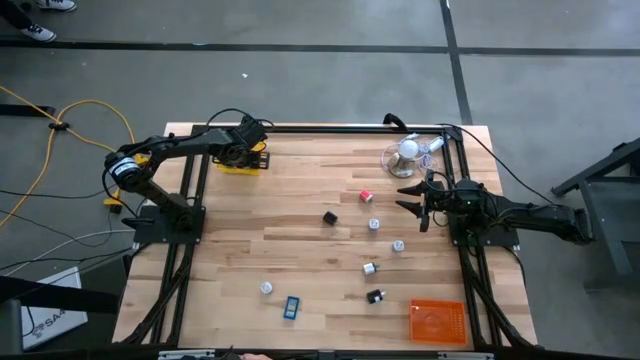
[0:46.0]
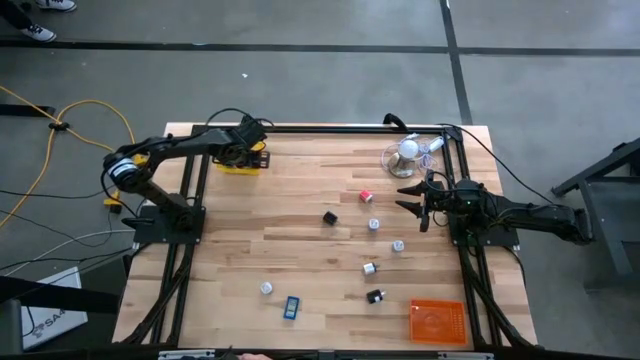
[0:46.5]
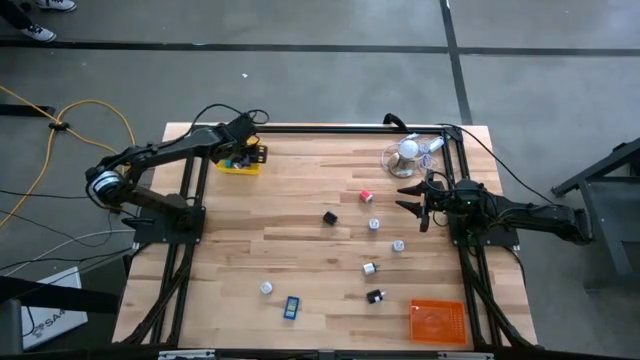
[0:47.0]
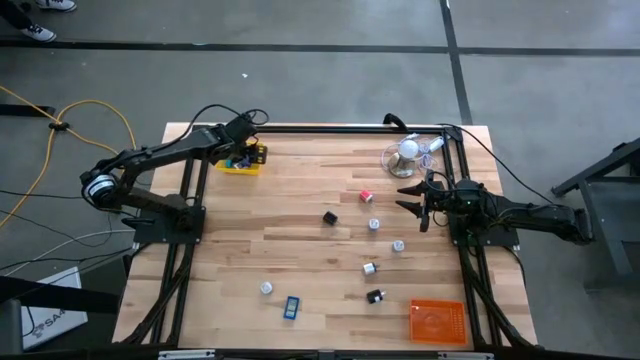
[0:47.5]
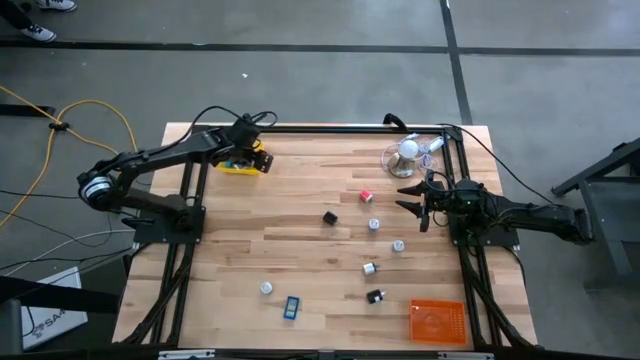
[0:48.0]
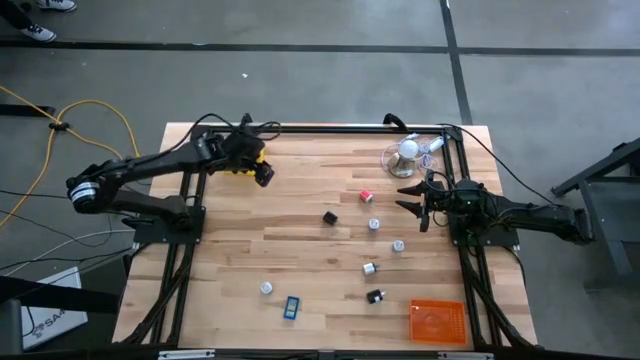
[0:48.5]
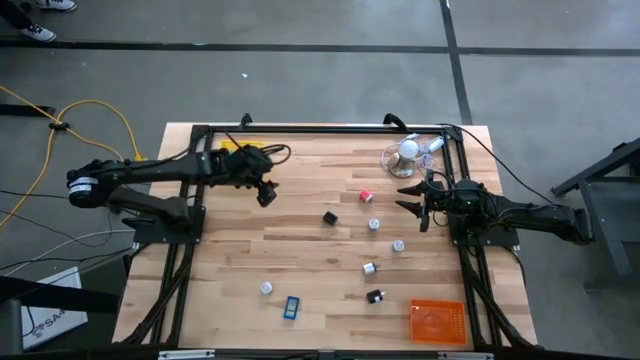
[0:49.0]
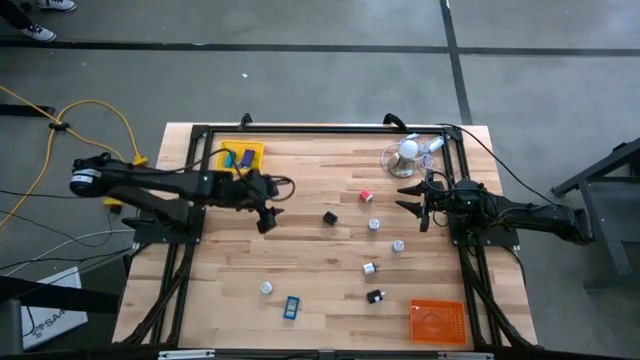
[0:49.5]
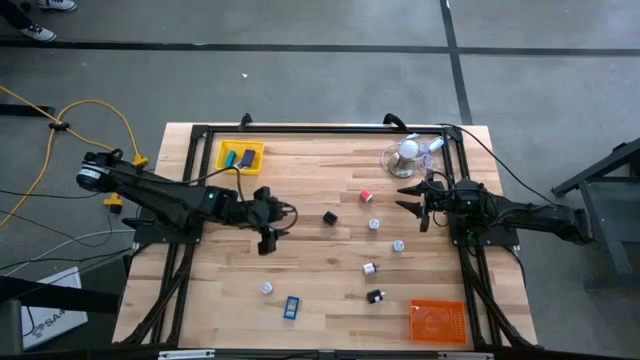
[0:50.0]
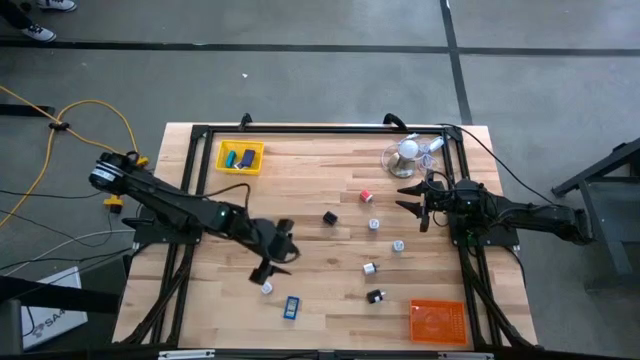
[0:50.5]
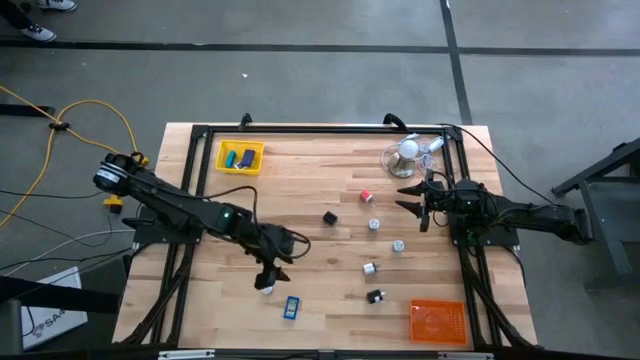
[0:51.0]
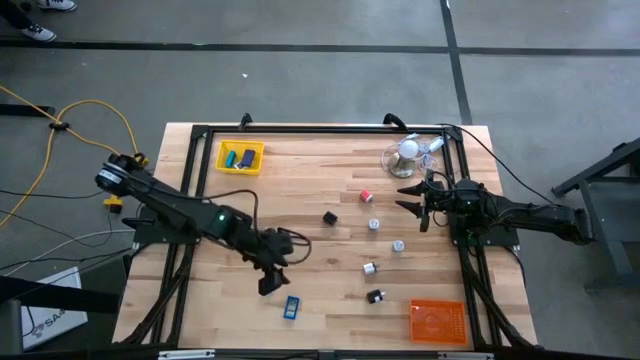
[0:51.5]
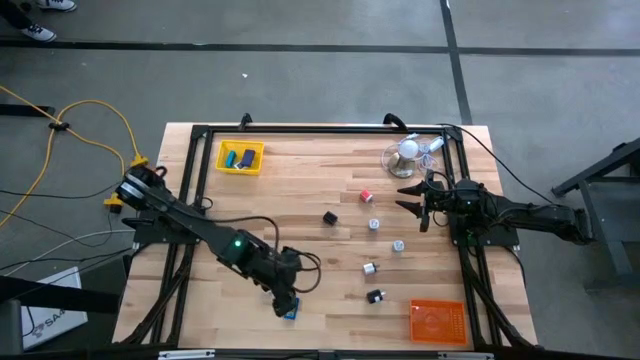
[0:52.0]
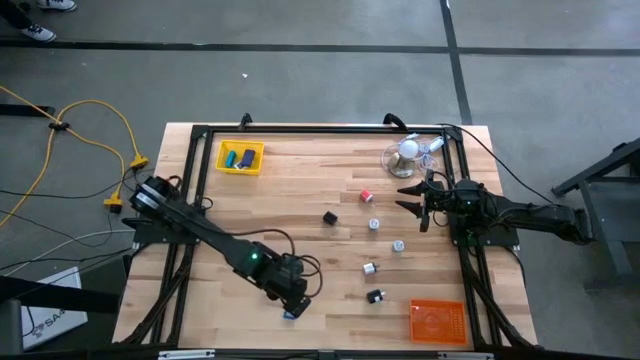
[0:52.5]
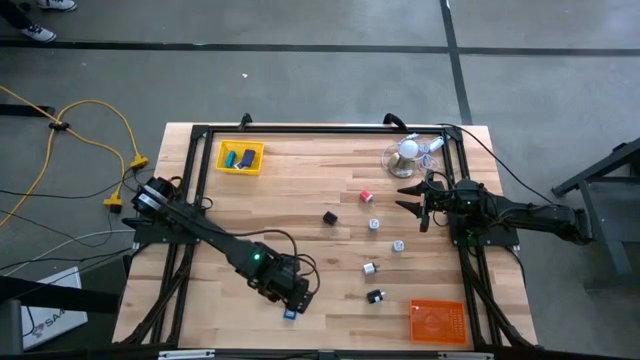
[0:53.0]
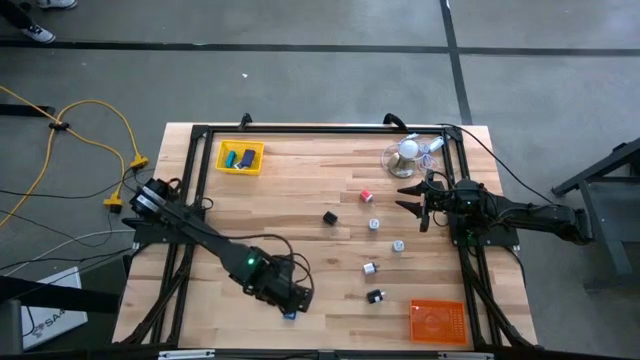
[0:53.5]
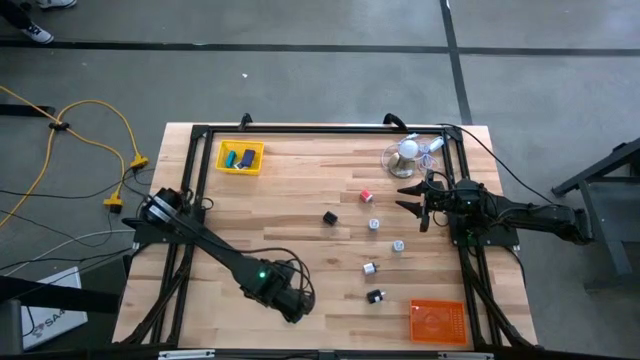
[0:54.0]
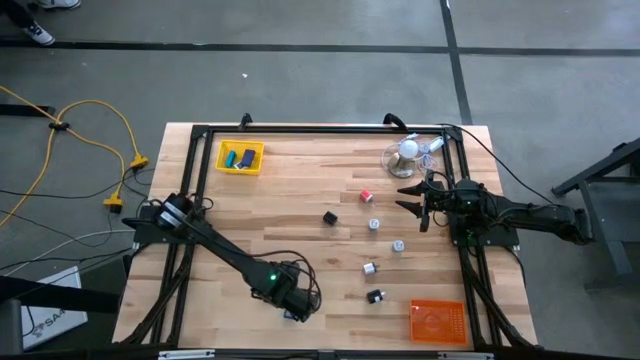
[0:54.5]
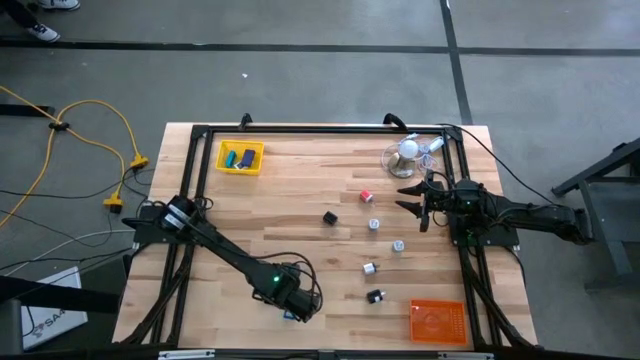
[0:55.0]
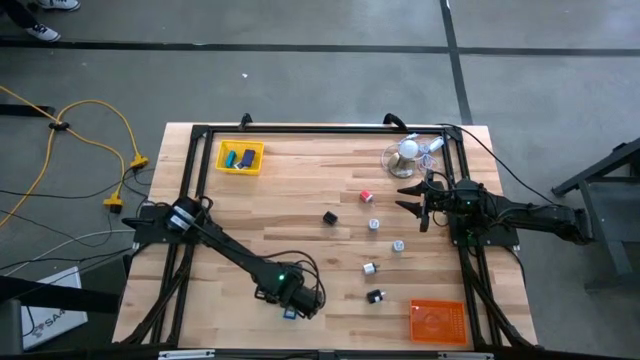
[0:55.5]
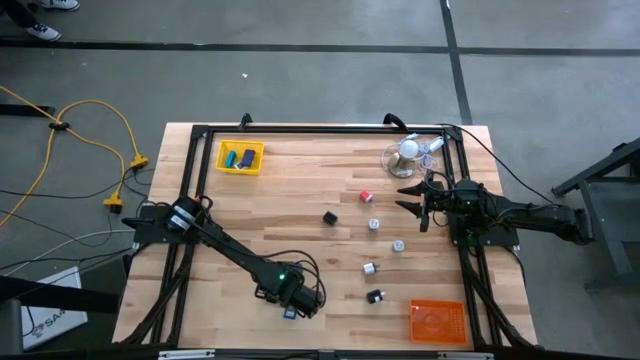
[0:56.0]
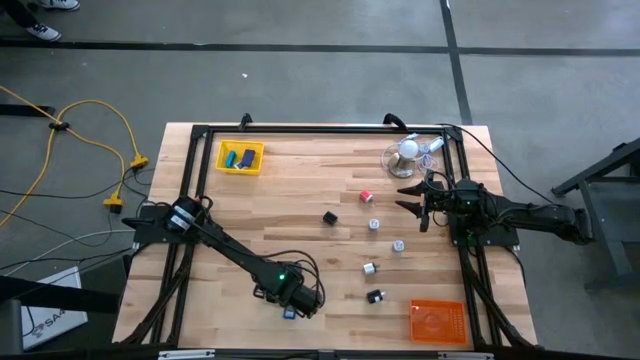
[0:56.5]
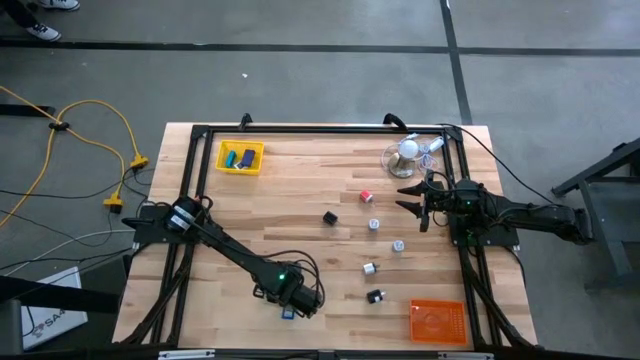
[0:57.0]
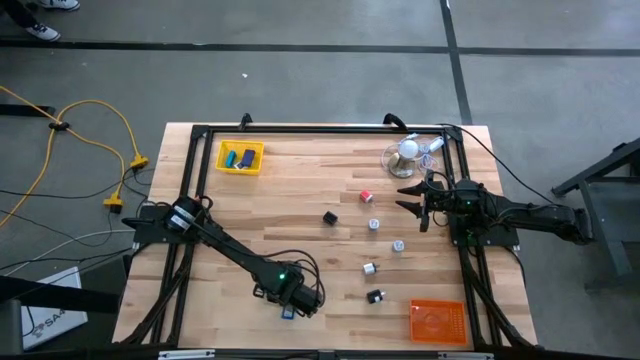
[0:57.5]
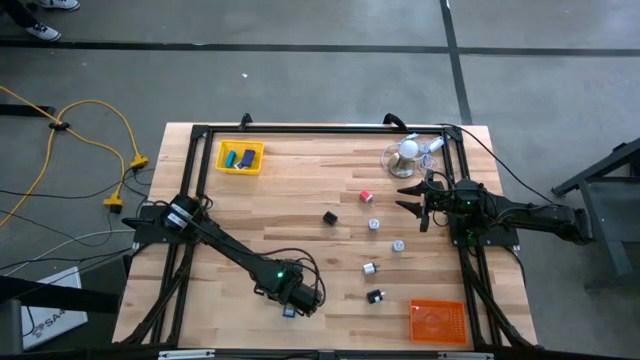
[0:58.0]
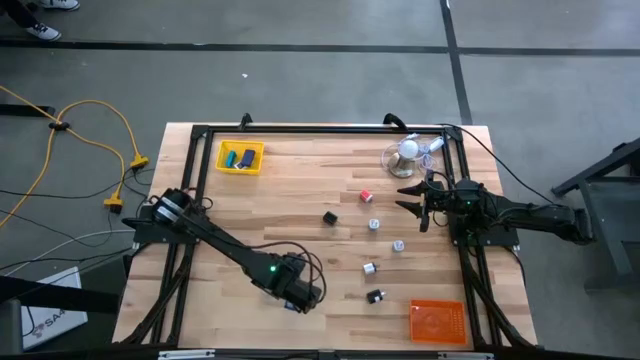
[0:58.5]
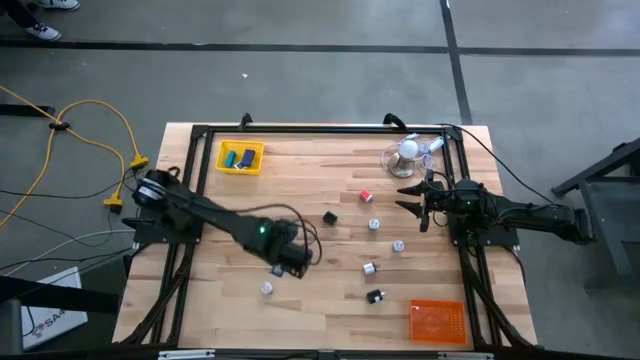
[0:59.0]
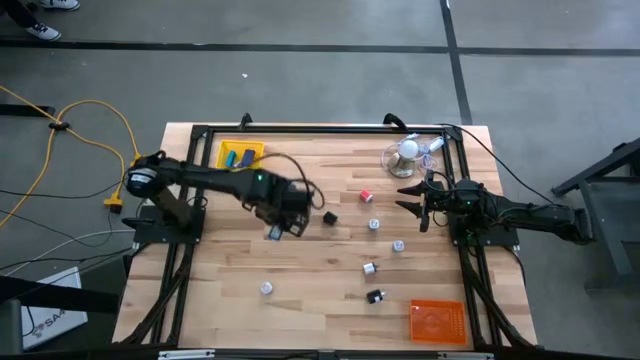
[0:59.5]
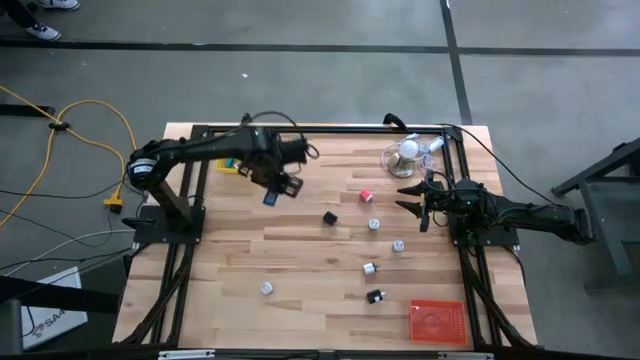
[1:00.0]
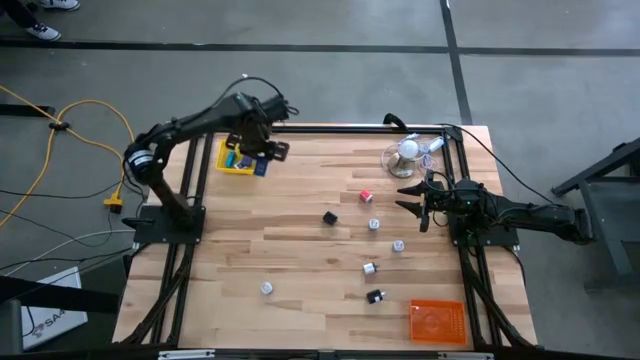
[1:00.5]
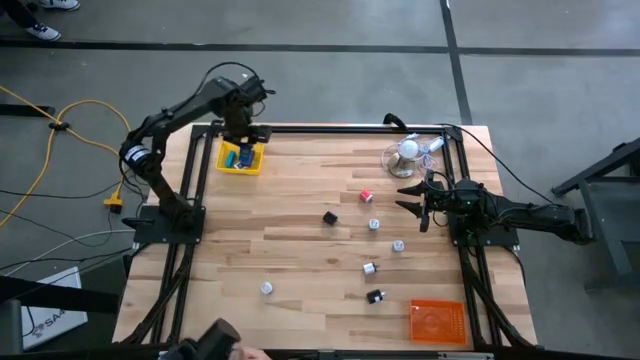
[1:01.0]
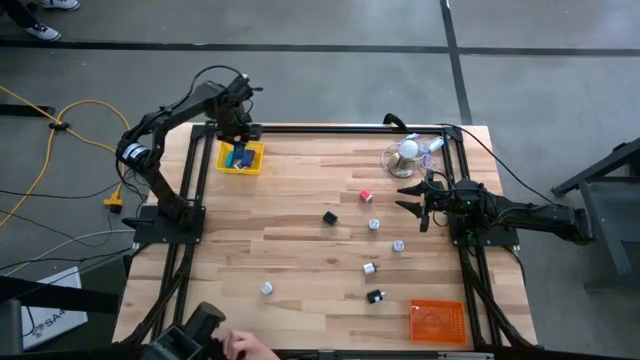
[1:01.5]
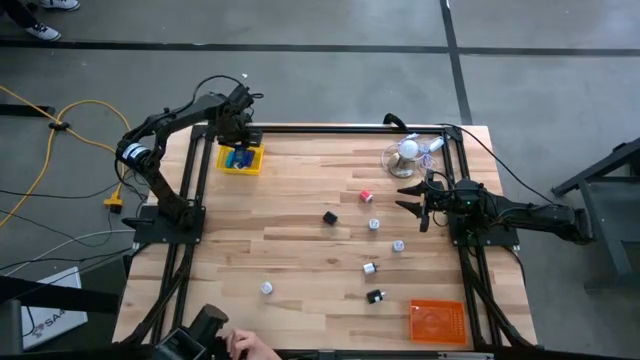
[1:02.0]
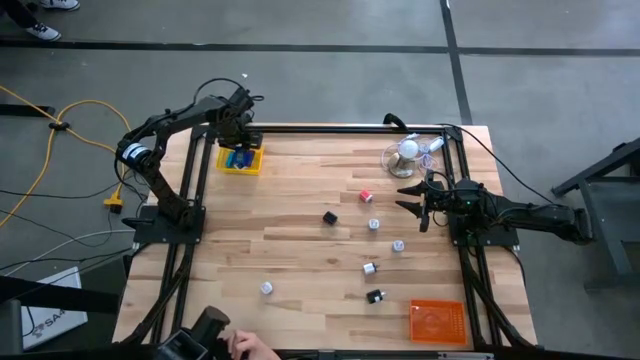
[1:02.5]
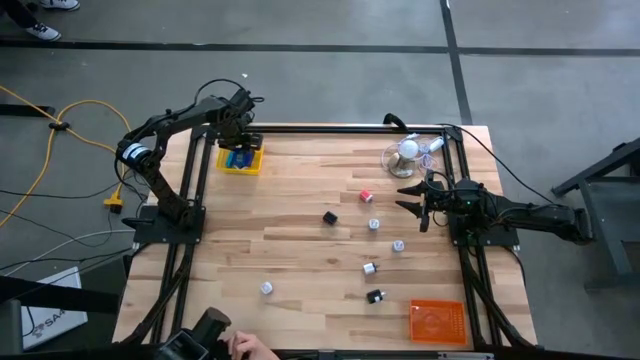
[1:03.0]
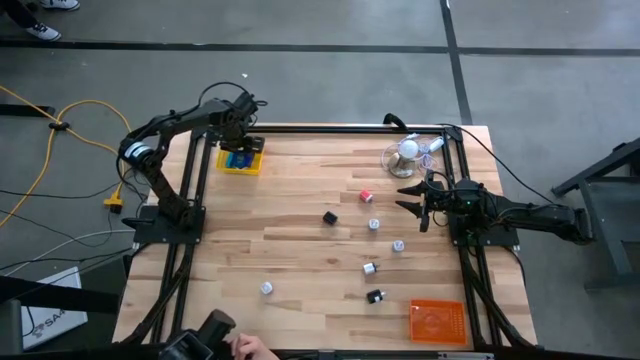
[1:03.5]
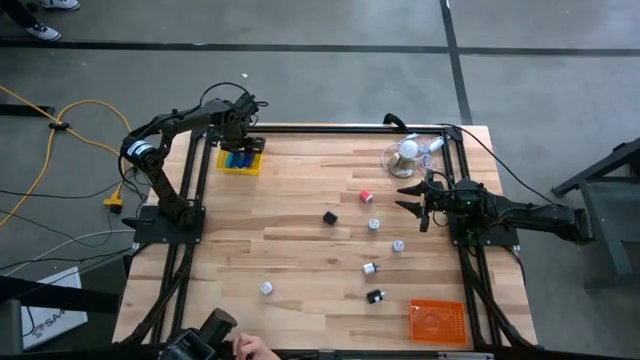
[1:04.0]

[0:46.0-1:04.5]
Task: Pick & Place Office items
Put the blue digital timer into the yellow bin
